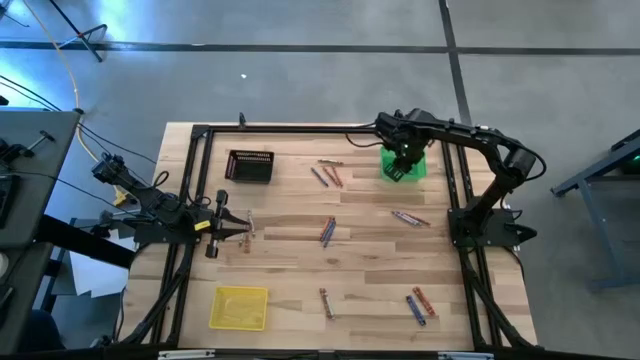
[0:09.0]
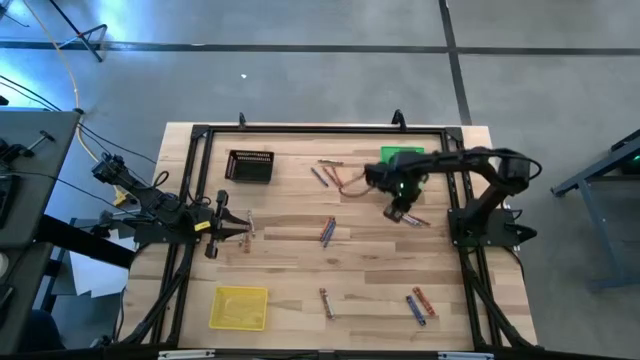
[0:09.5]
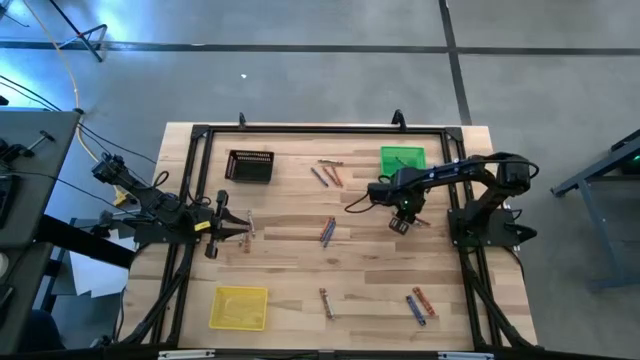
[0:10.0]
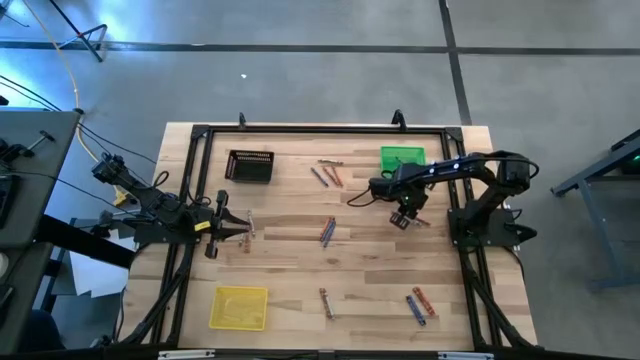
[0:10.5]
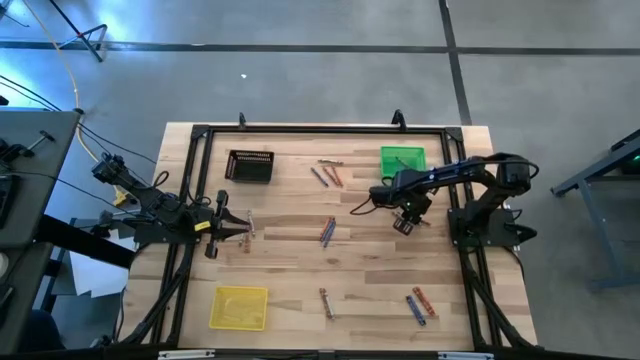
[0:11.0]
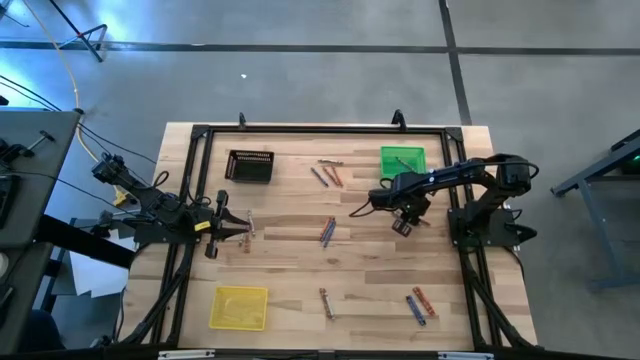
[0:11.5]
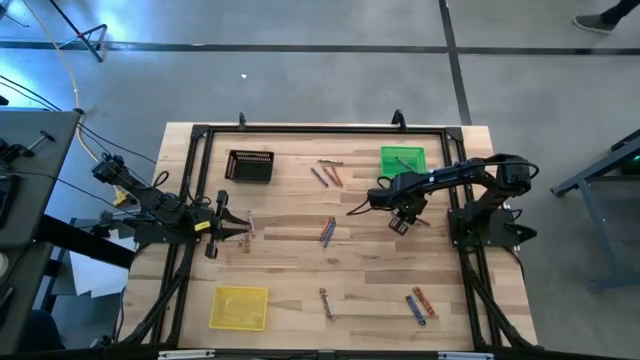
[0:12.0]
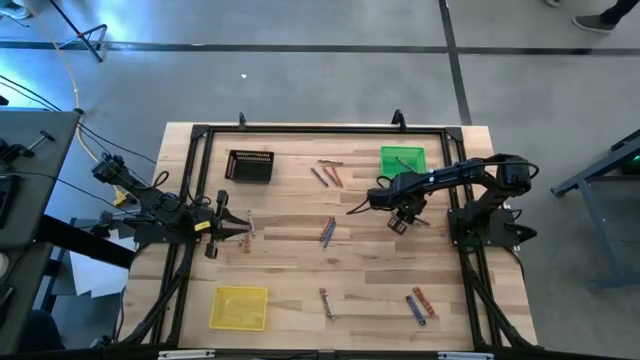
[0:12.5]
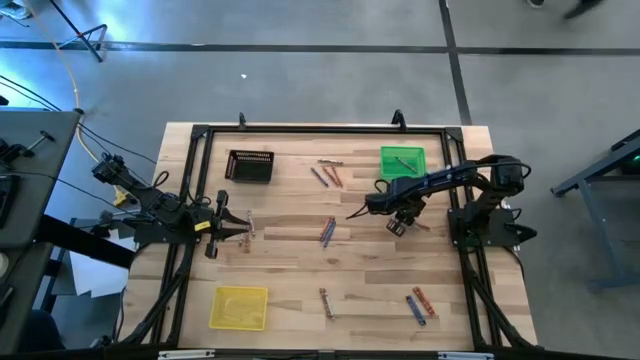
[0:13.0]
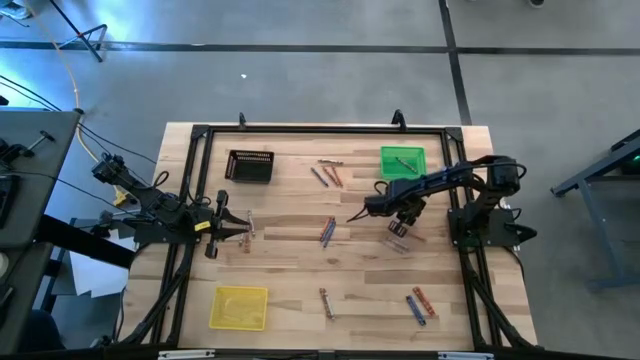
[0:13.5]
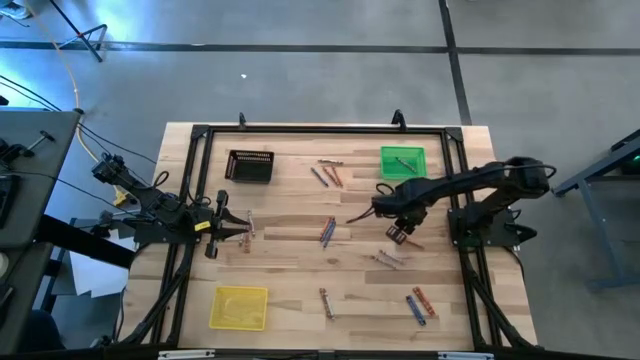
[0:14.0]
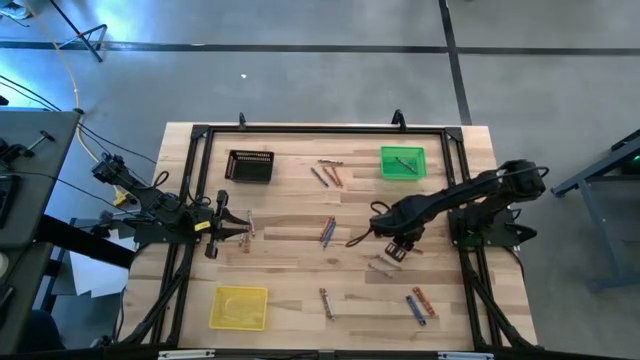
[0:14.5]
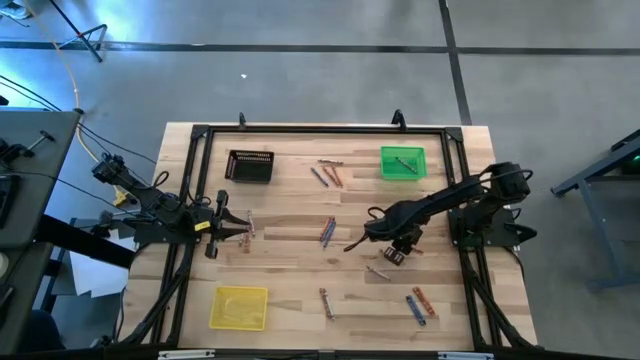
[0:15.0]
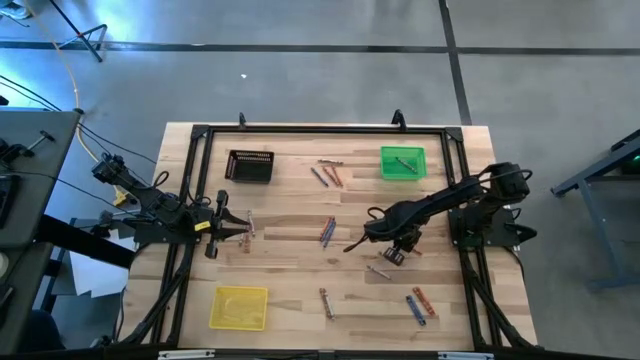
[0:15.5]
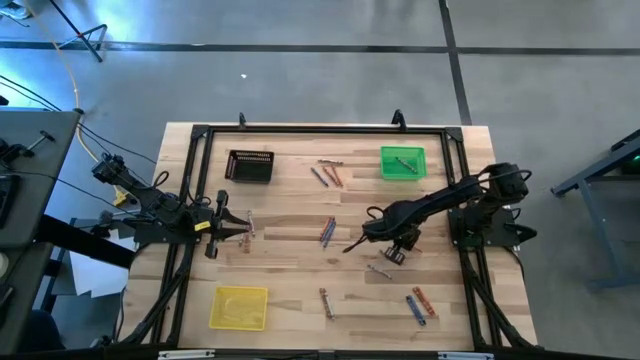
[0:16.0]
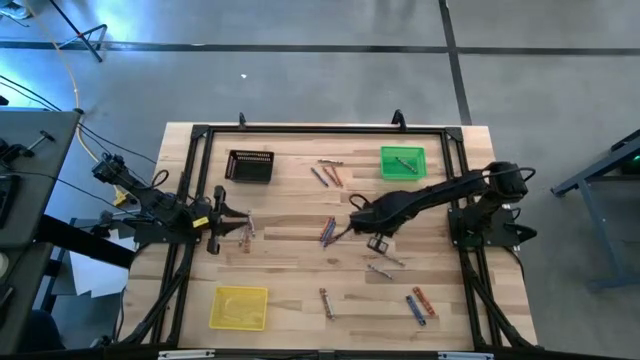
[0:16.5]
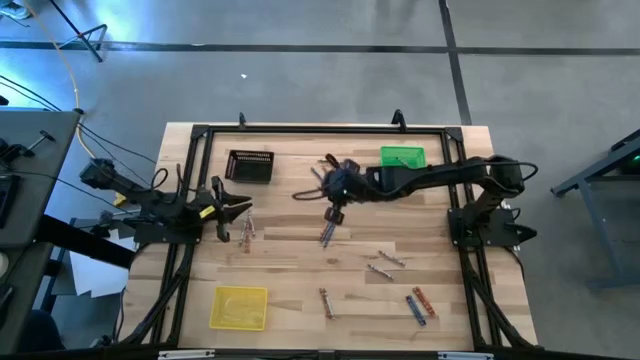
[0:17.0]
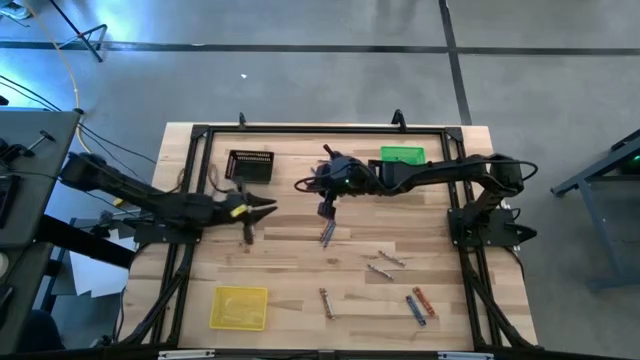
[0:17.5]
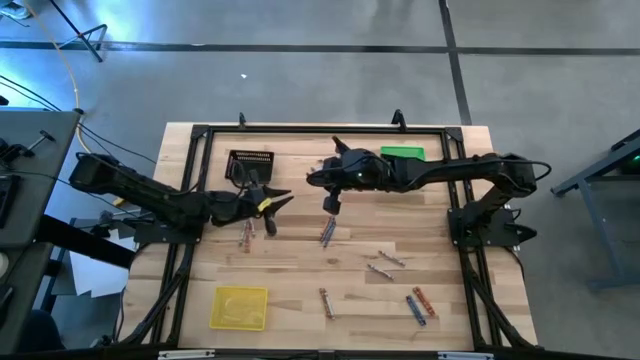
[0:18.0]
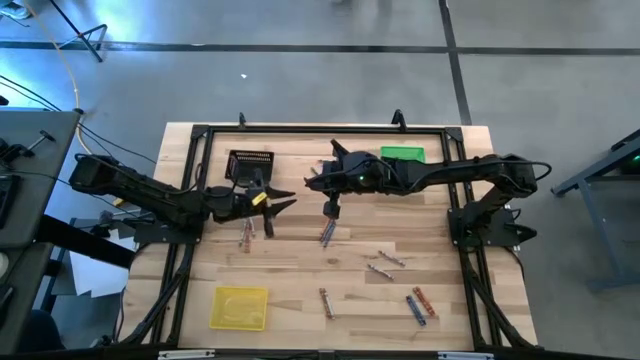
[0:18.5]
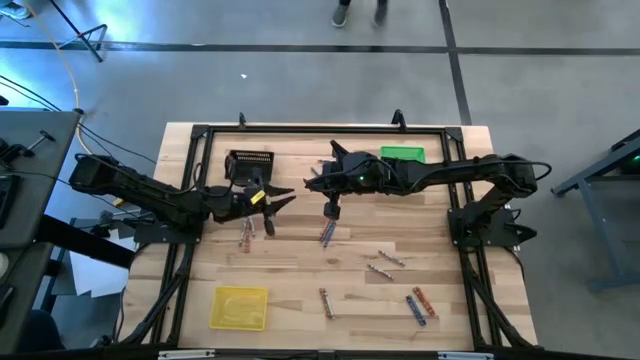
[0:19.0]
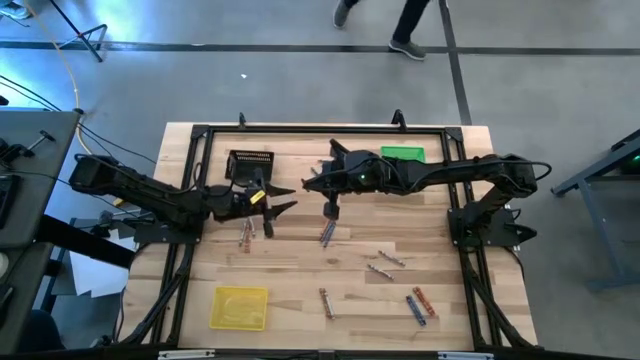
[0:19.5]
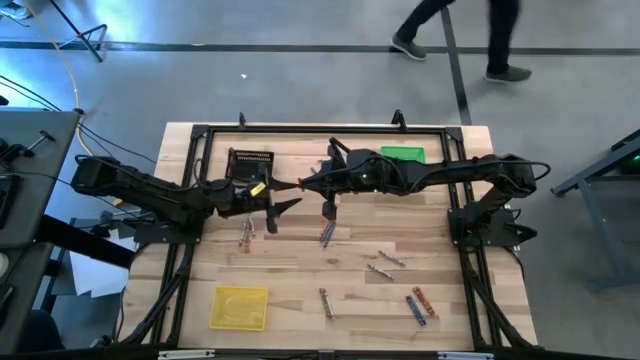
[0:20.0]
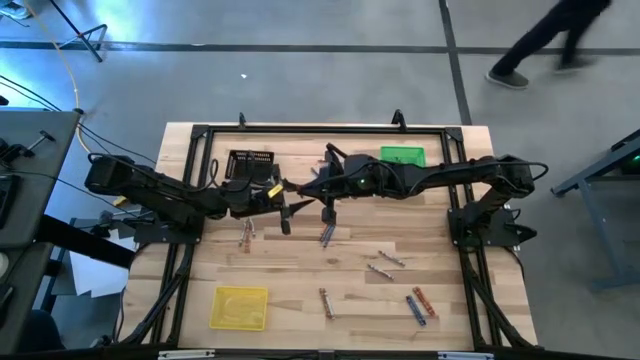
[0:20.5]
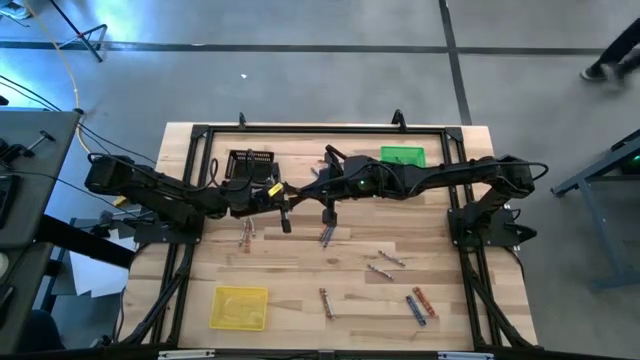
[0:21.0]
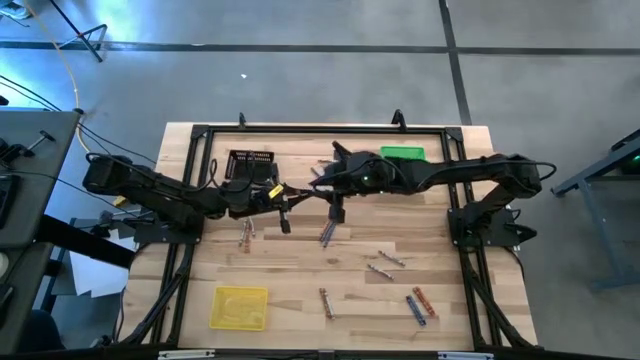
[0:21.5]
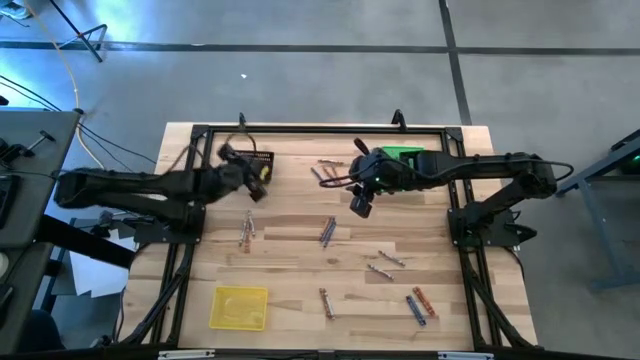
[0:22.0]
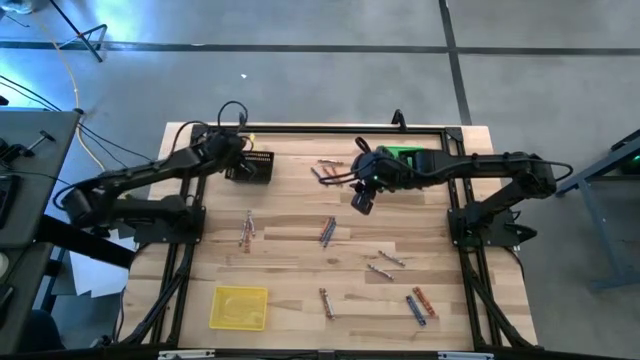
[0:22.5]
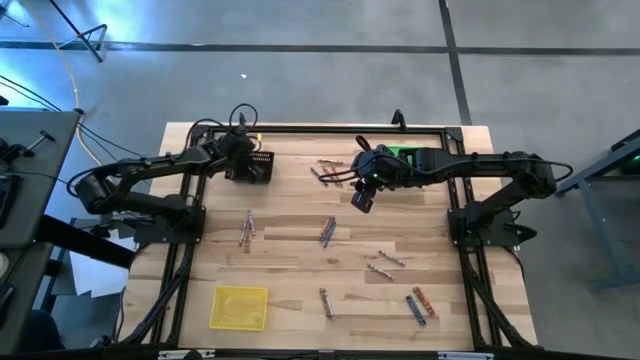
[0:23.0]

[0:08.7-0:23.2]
Task: Sort crayons
Put the orange crayon into the black bin

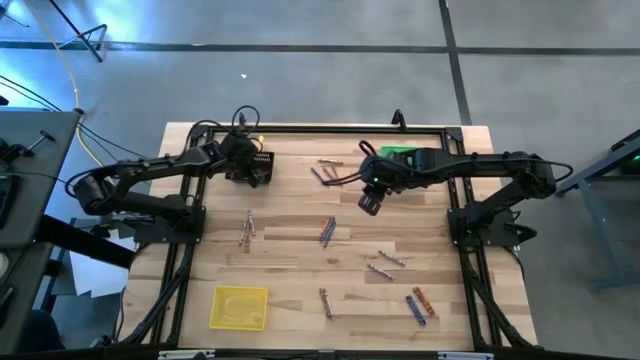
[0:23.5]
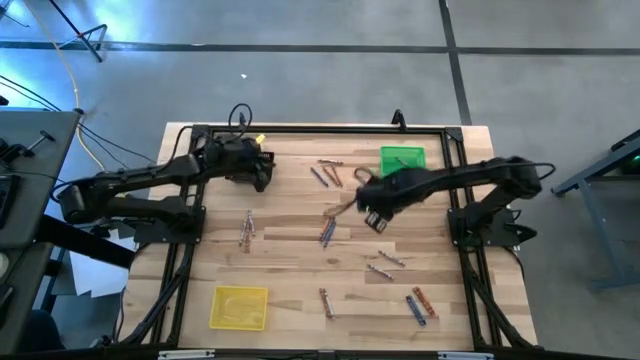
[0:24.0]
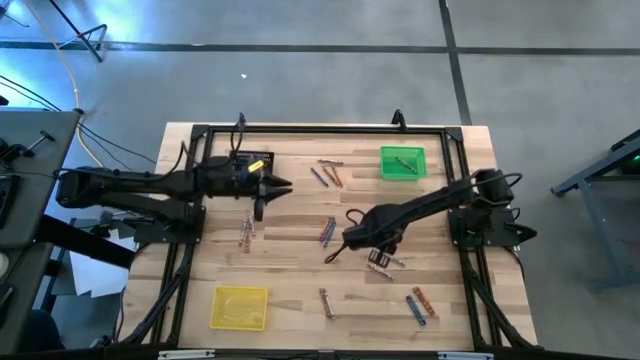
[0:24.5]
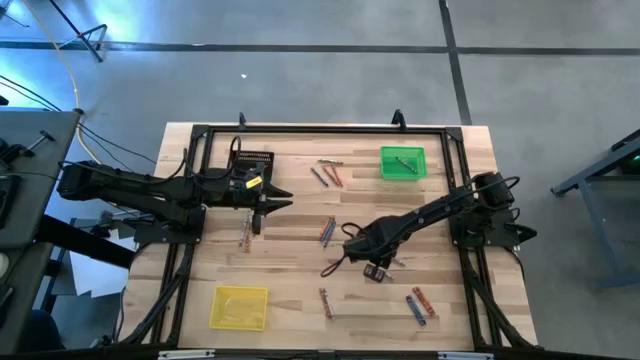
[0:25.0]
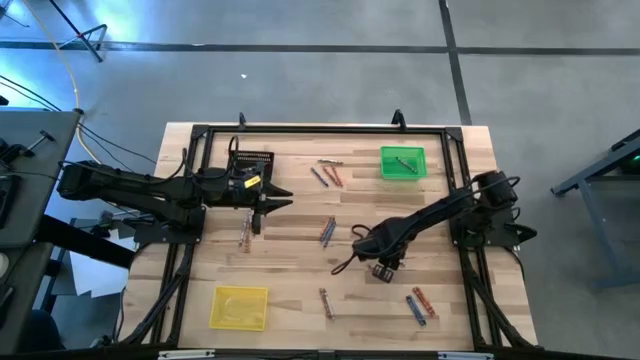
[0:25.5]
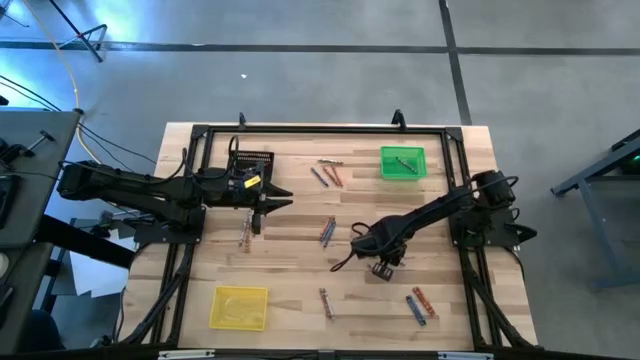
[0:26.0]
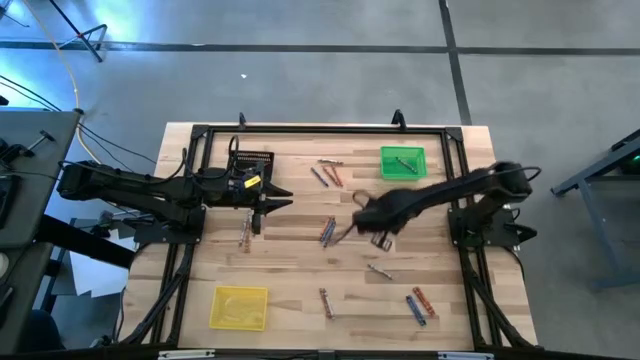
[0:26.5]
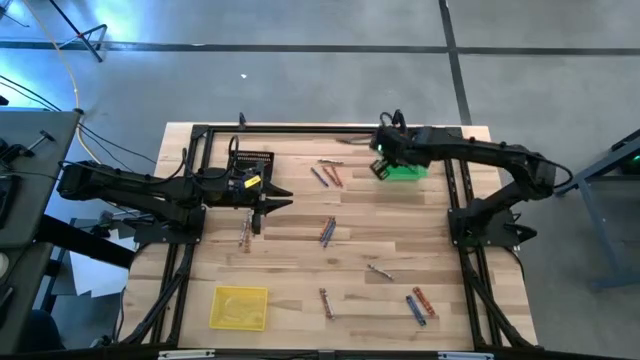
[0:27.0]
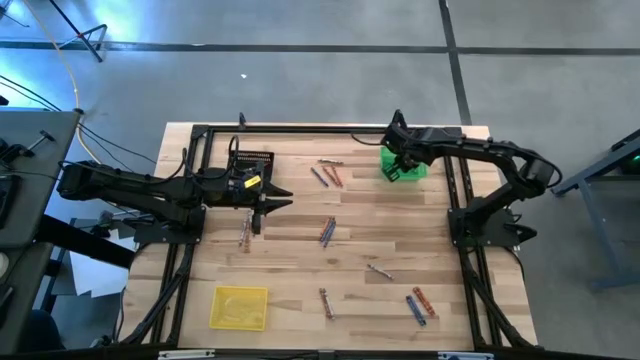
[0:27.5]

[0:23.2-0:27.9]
Put the gray crayon into the green bin

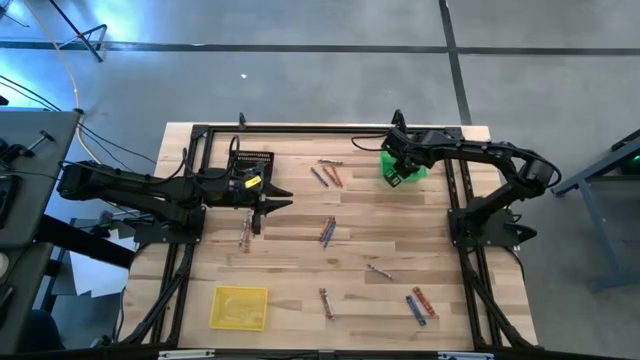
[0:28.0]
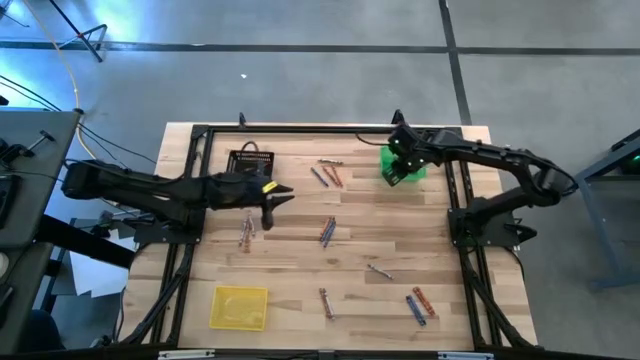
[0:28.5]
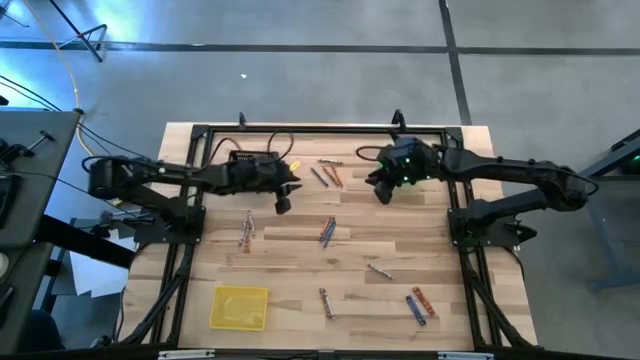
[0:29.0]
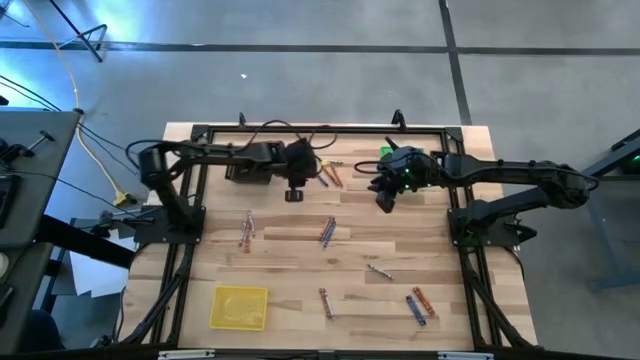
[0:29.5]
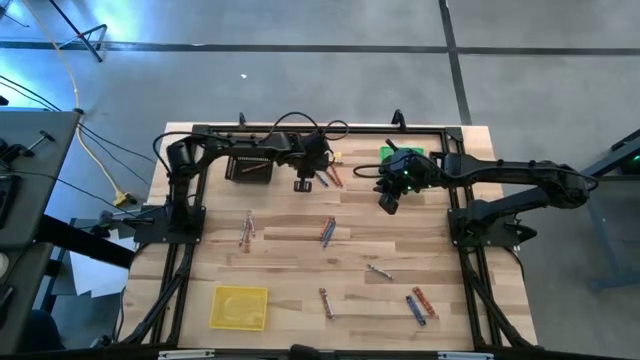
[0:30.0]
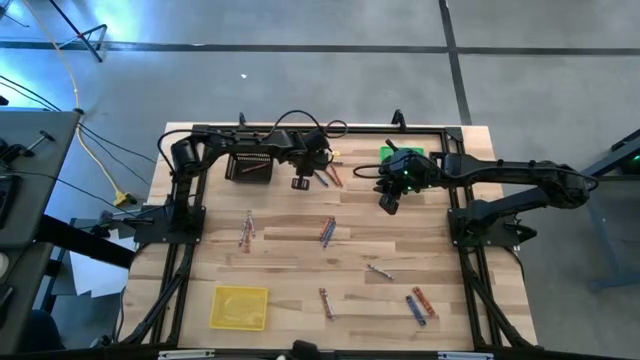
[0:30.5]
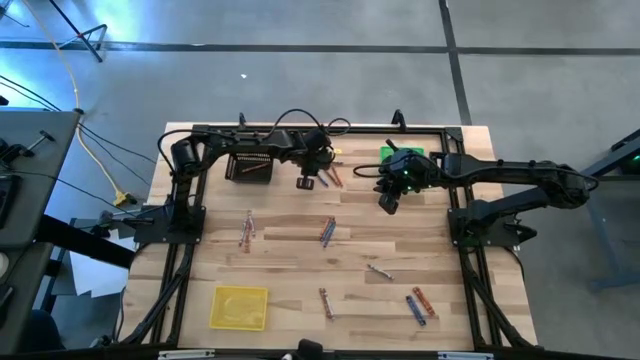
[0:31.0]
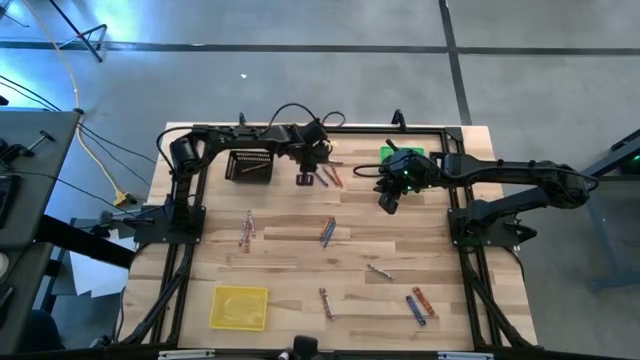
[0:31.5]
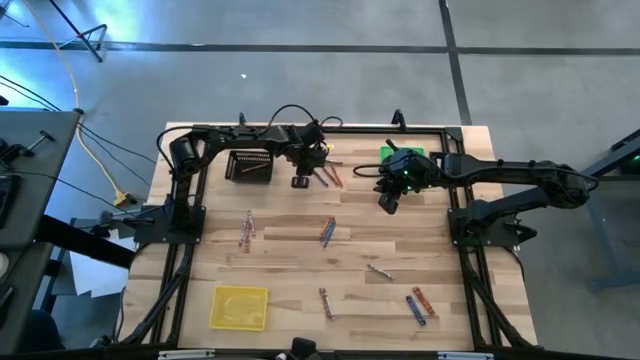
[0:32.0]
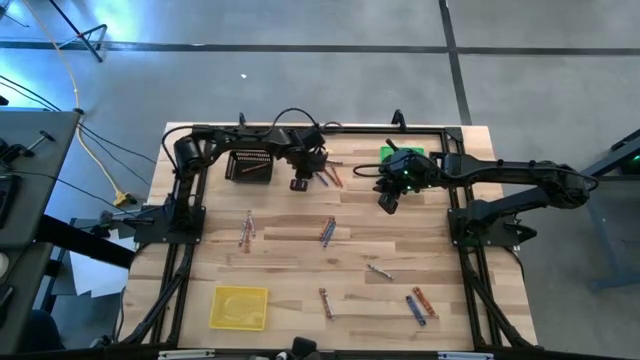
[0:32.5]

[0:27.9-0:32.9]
Put the blue crayon into the yellow bin
